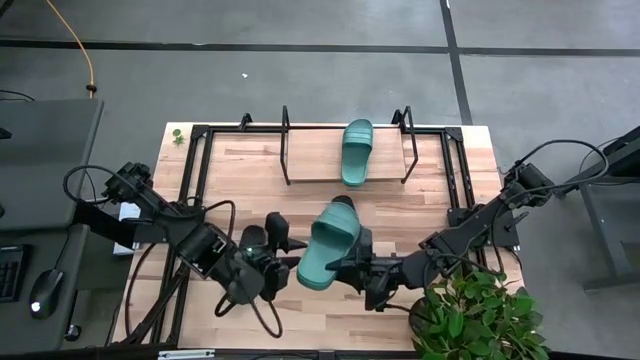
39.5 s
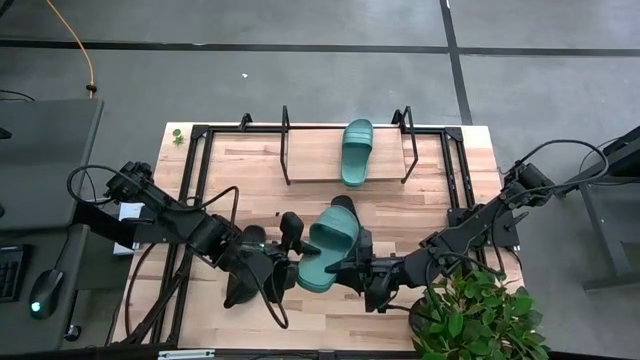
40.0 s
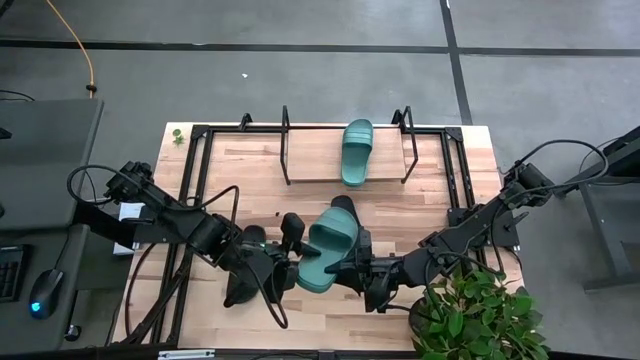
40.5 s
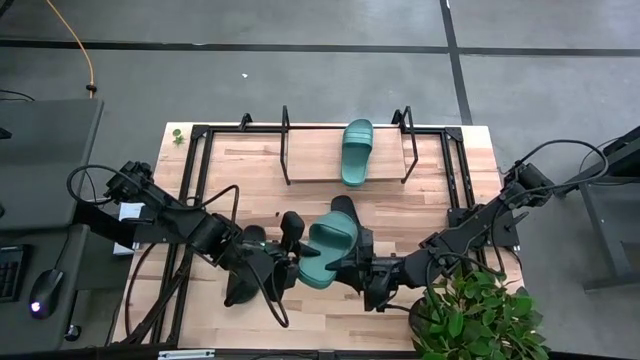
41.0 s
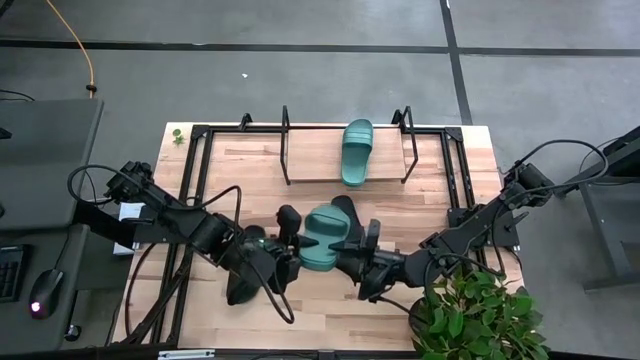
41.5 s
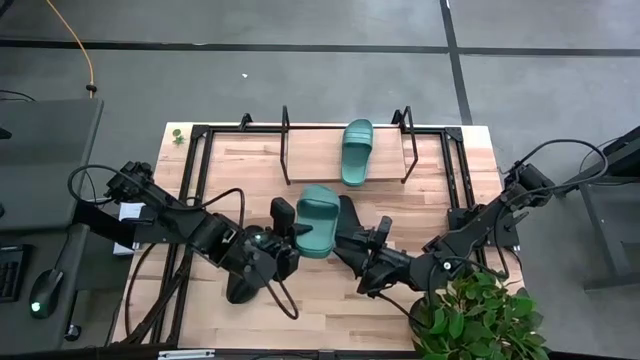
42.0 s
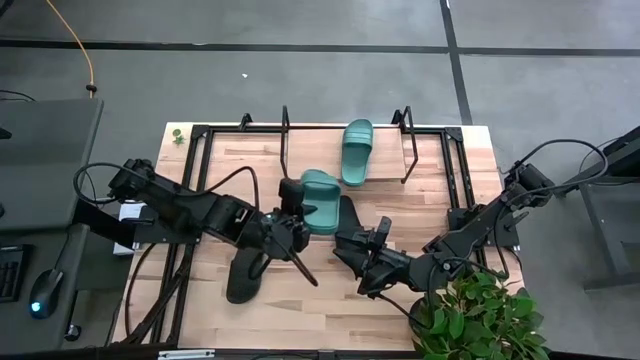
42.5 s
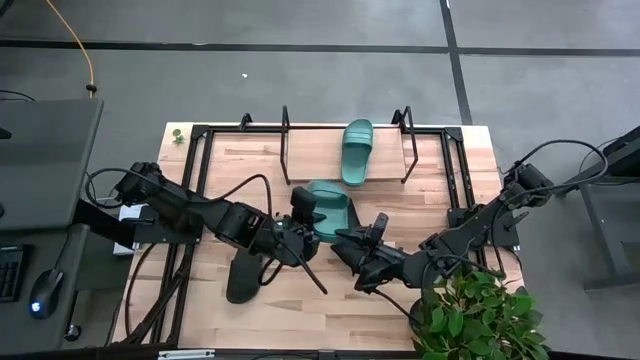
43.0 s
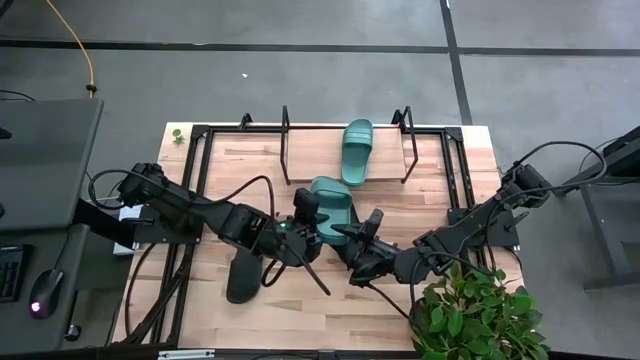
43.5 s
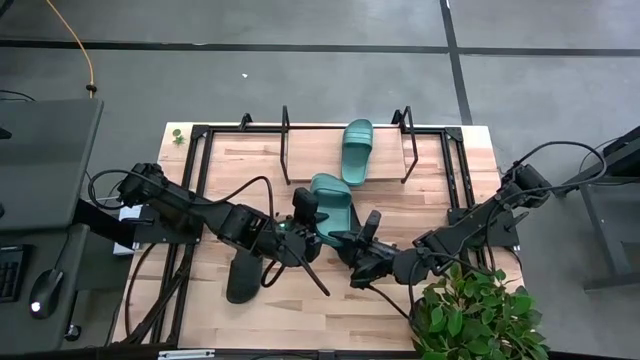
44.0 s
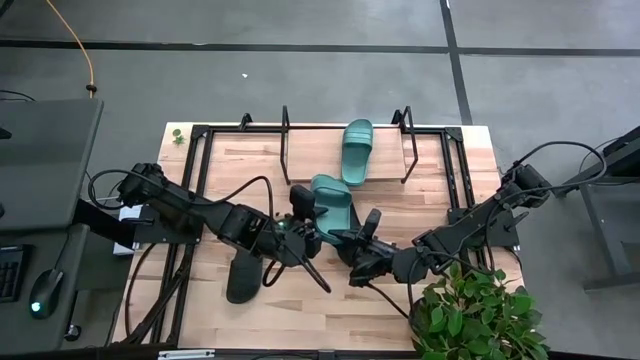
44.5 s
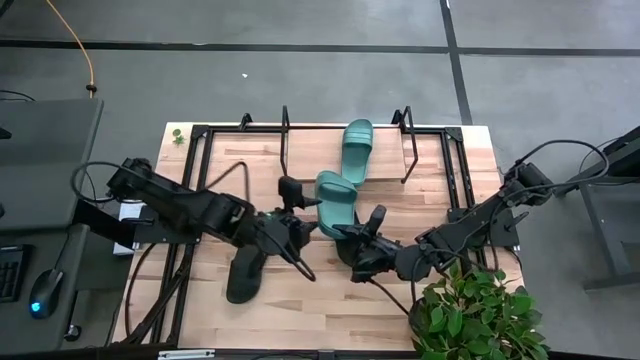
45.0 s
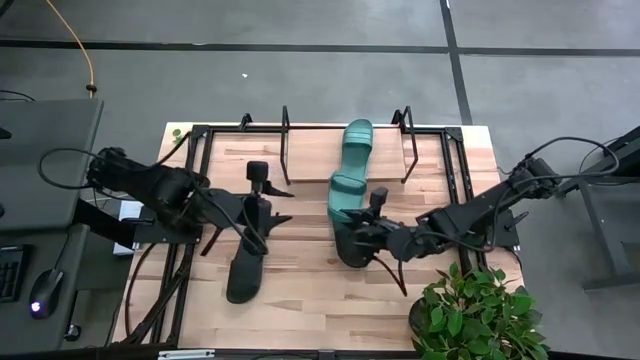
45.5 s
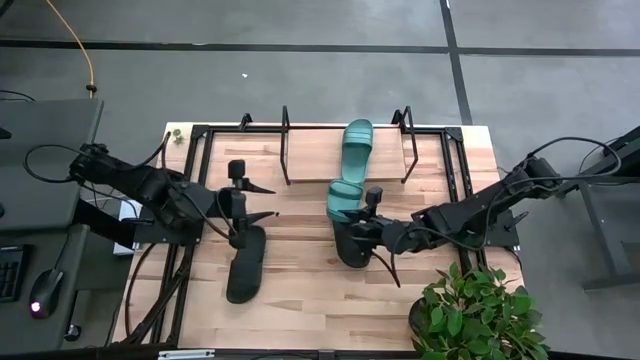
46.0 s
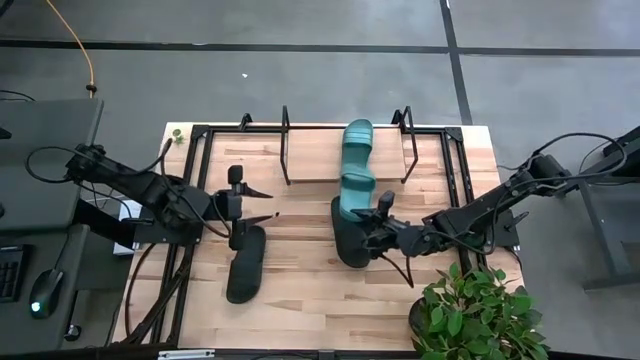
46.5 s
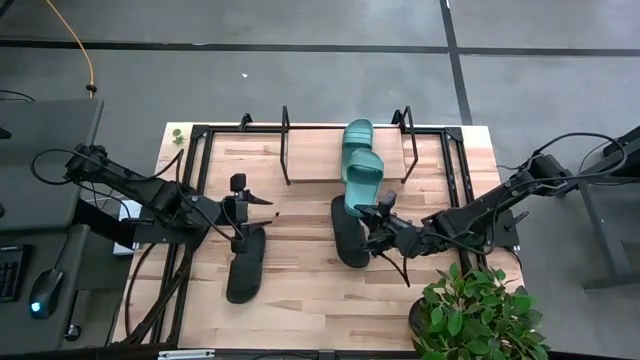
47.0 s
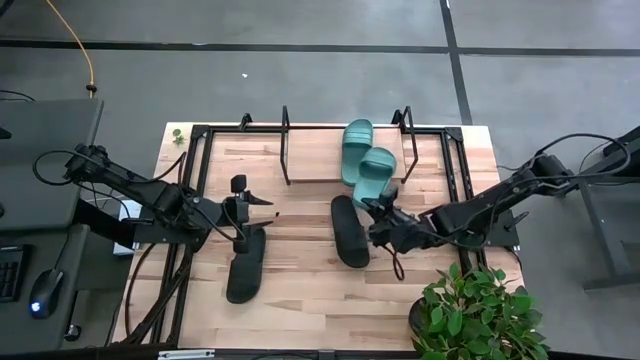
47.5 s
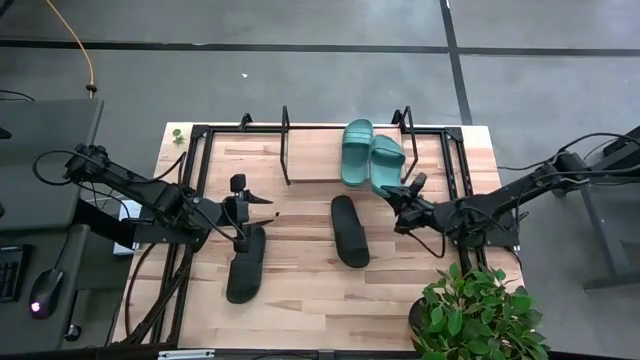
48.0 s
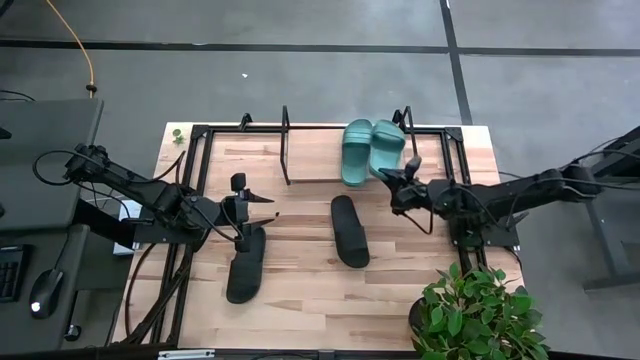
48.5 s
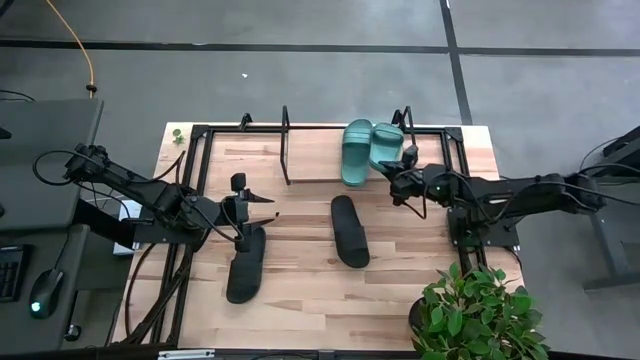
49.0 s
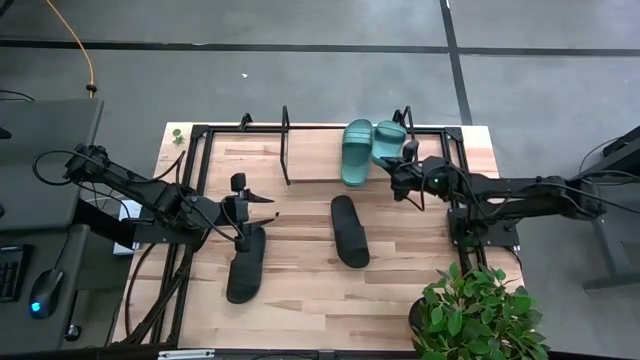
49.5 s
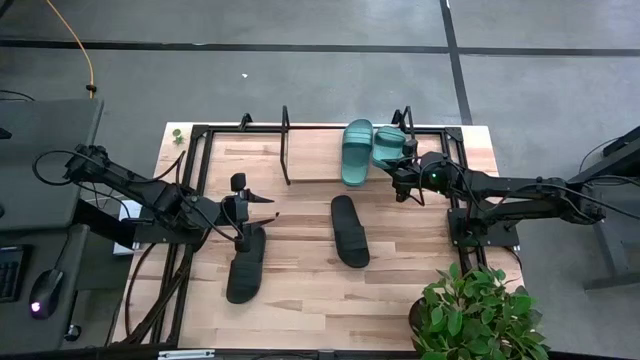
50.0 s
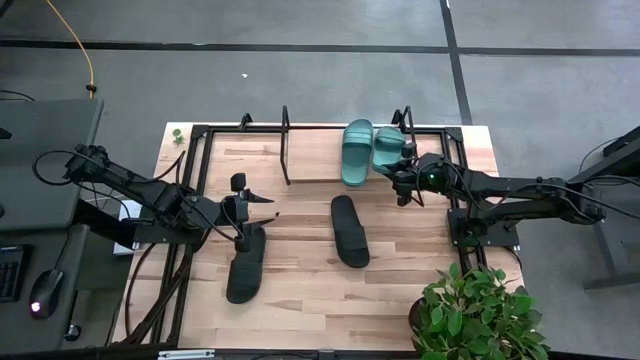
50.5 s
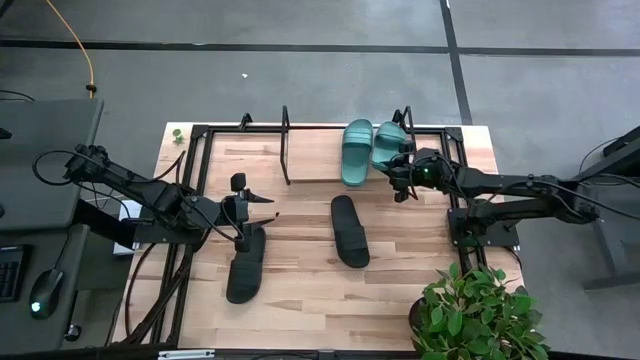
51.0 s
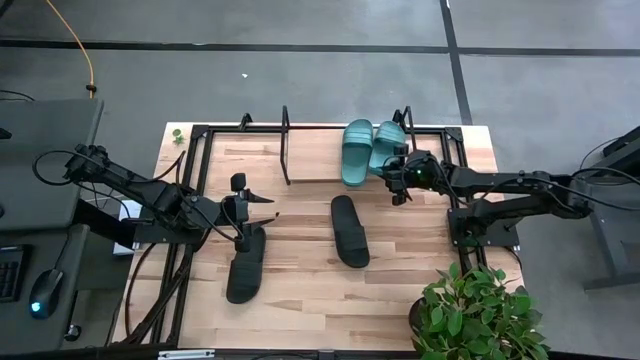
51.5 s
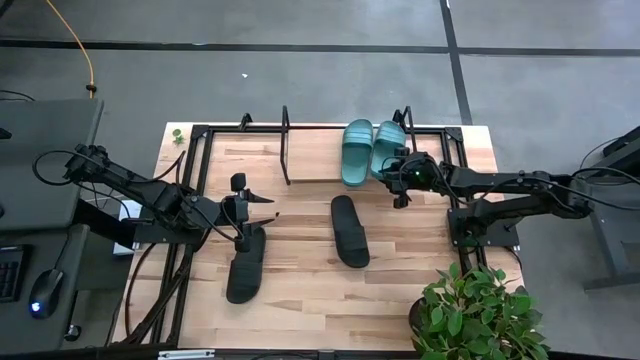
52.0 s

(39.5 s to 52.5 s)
Task: Pick and place slides into the shelf
Put the green slide on the shelf

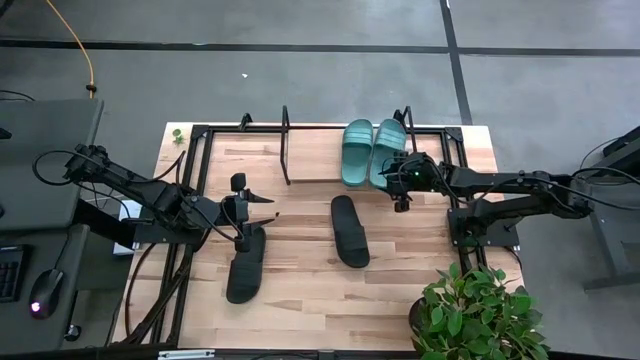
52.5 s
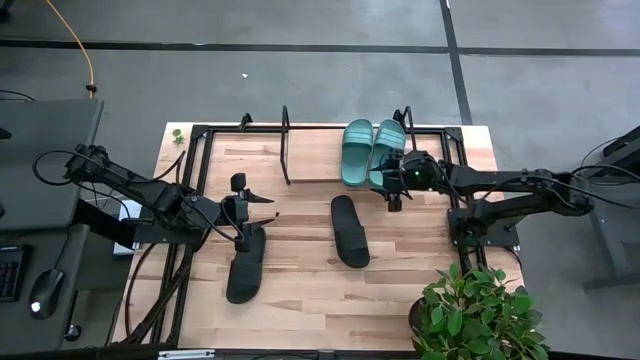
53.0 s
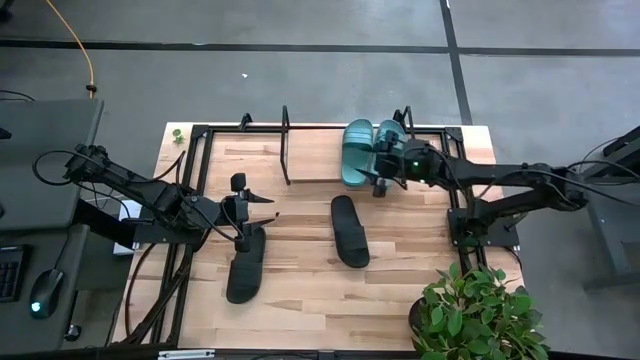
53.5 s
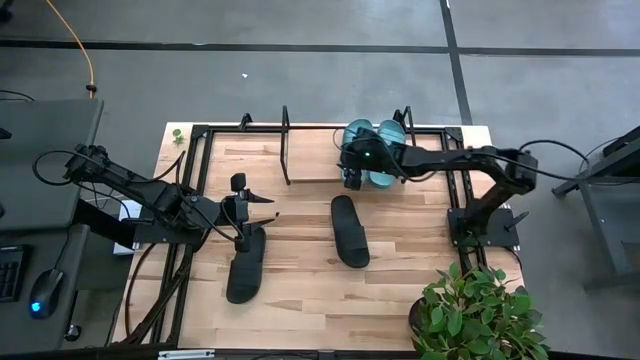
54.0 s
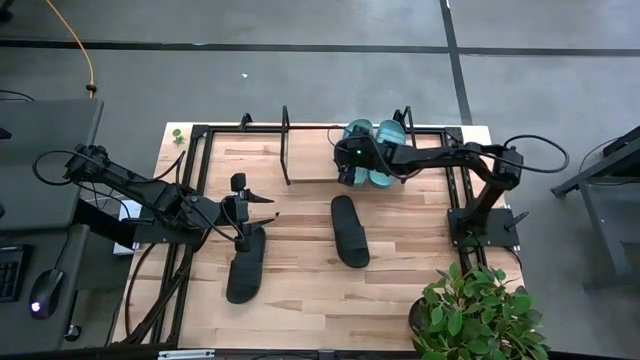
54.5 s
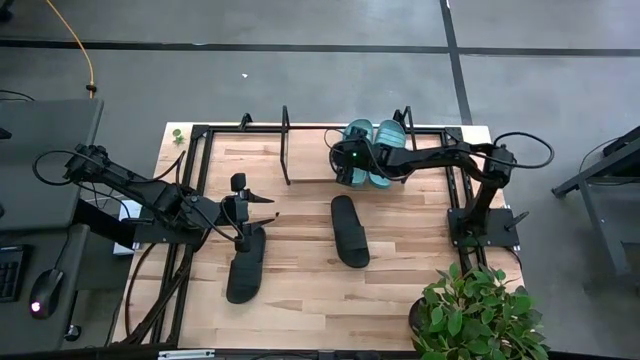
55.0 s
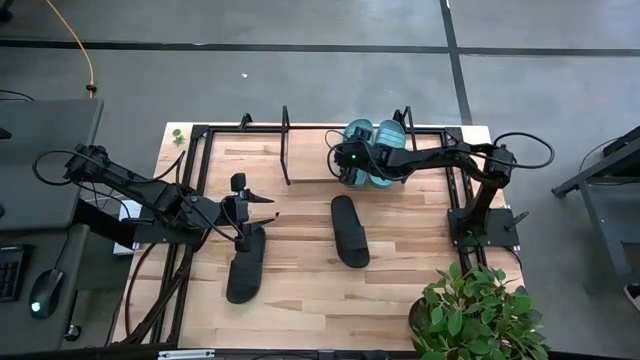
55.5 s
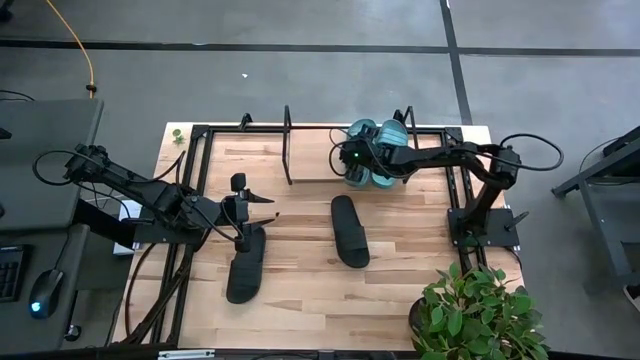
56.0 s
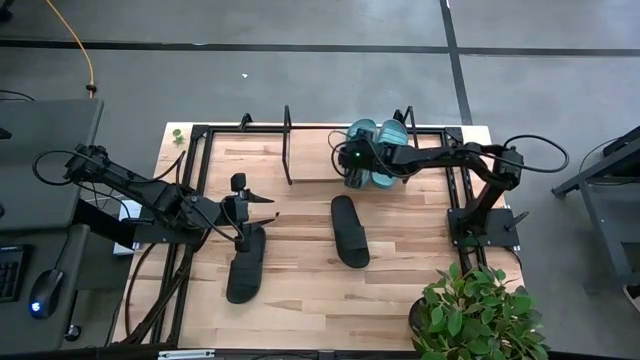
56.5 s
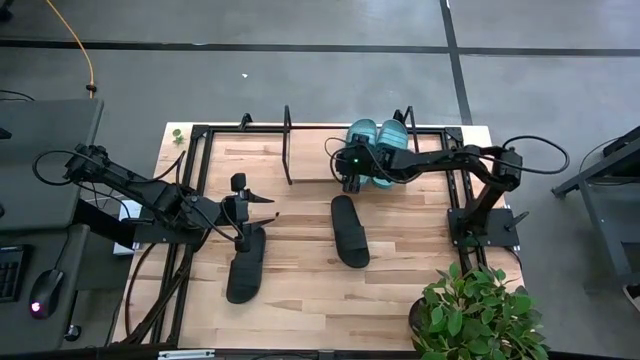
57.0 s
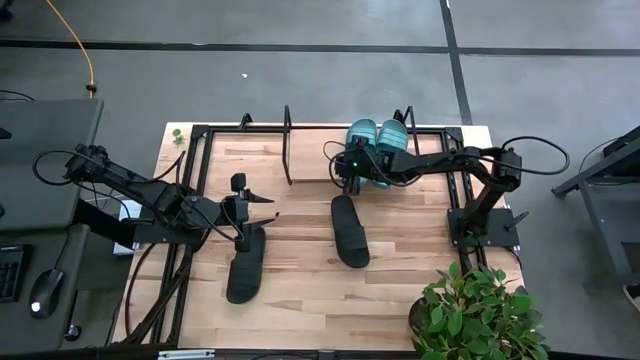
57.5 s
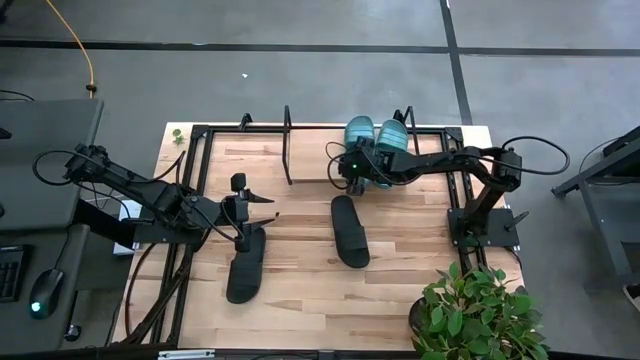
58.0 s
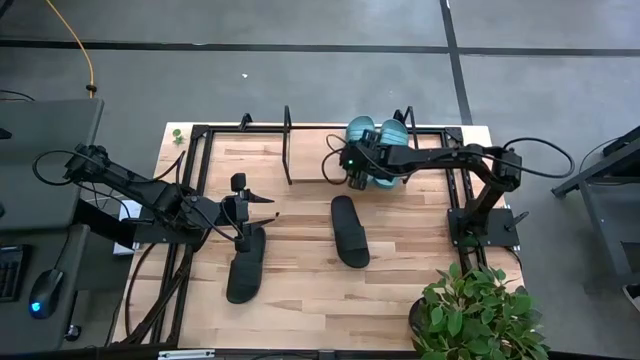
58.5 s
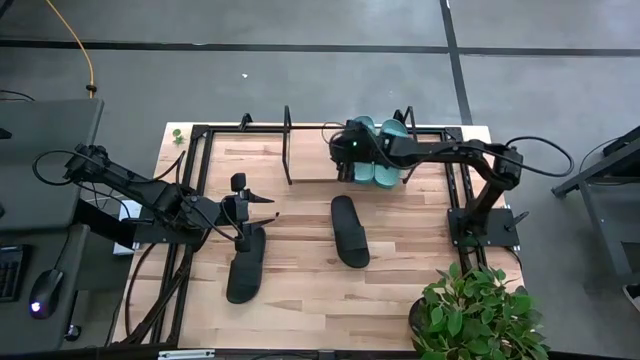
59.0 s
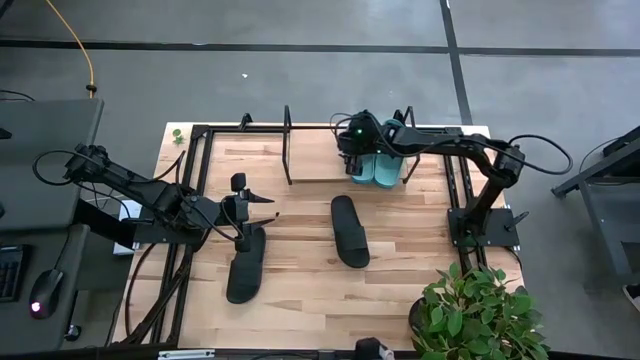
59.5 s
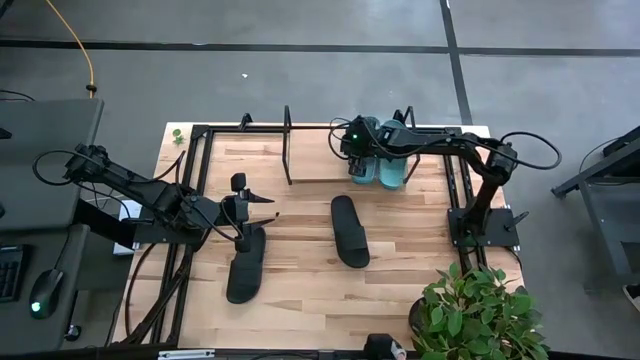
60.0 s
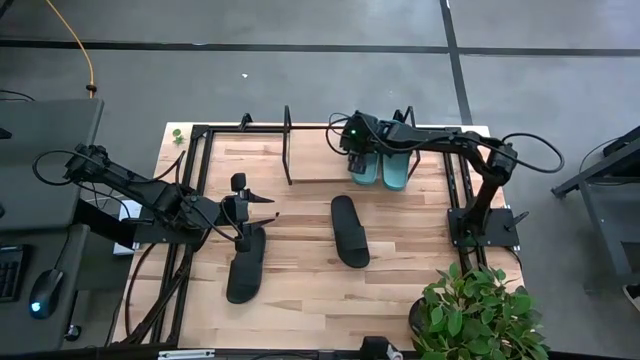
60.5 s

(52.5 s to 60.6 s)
Adjust the left green slide on the shelf
